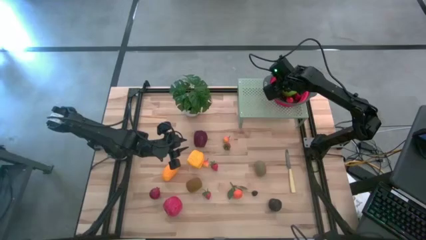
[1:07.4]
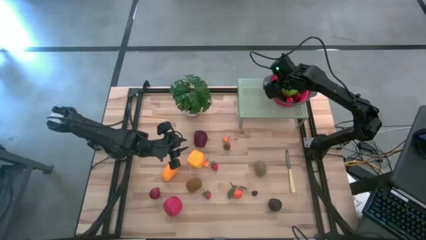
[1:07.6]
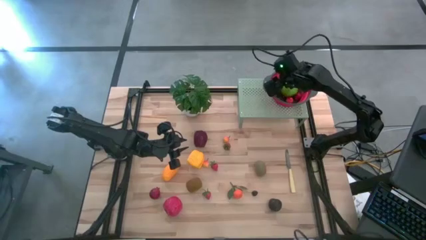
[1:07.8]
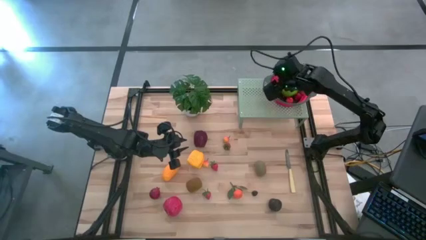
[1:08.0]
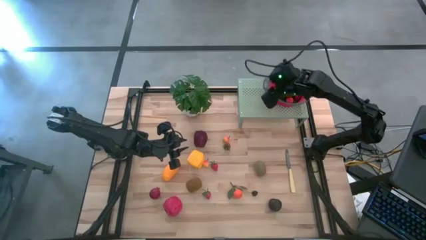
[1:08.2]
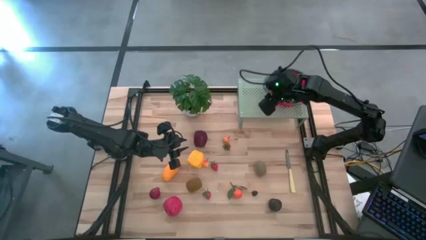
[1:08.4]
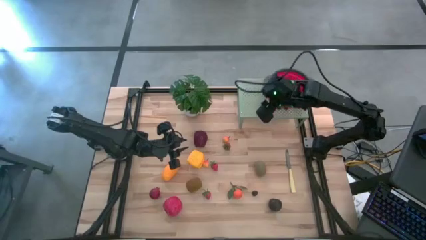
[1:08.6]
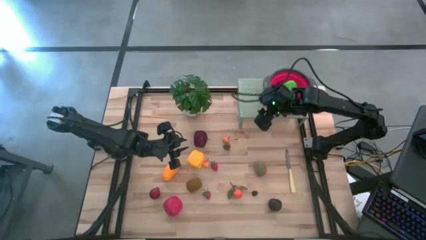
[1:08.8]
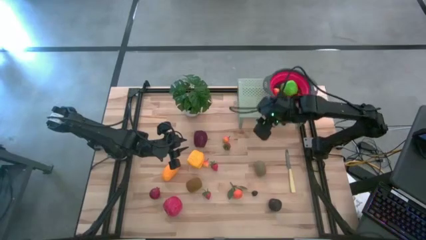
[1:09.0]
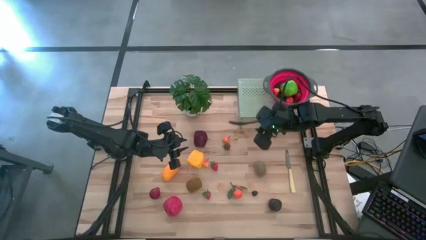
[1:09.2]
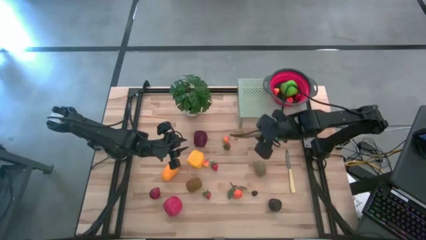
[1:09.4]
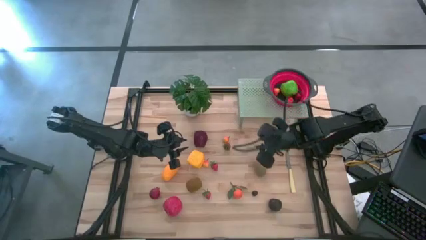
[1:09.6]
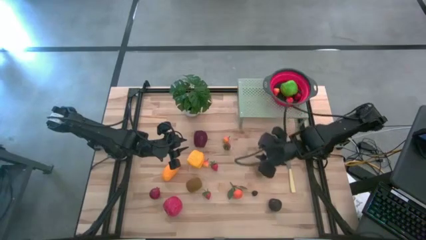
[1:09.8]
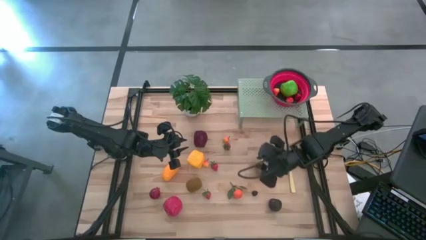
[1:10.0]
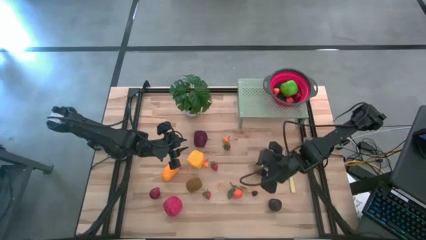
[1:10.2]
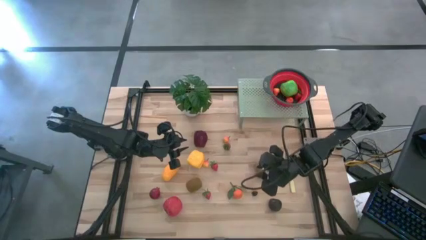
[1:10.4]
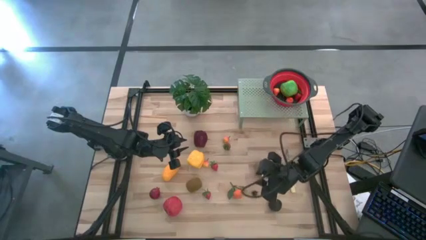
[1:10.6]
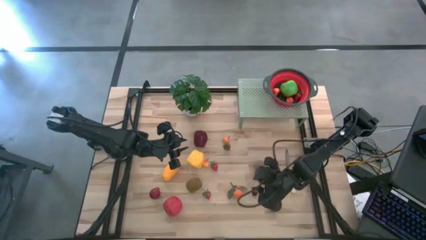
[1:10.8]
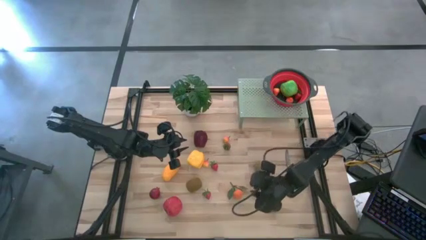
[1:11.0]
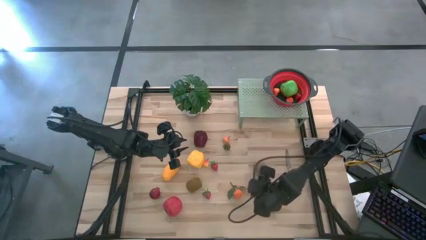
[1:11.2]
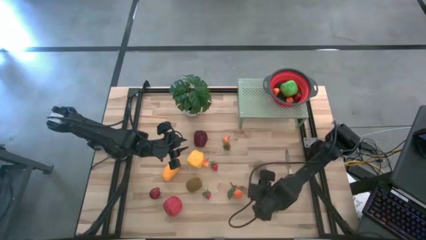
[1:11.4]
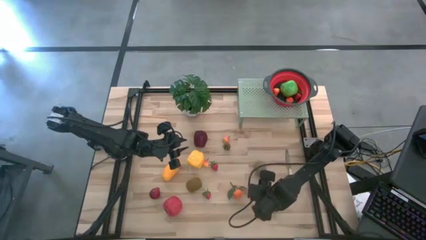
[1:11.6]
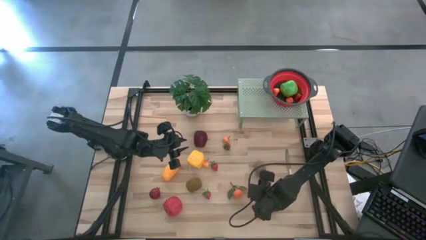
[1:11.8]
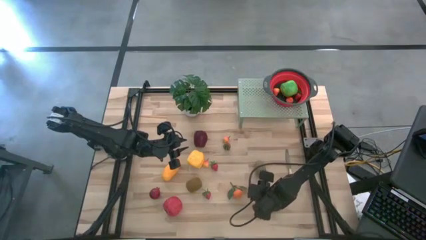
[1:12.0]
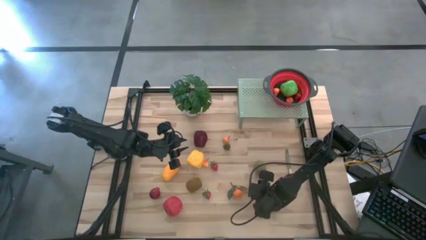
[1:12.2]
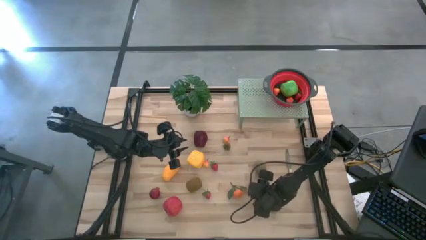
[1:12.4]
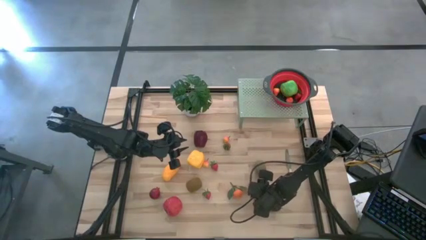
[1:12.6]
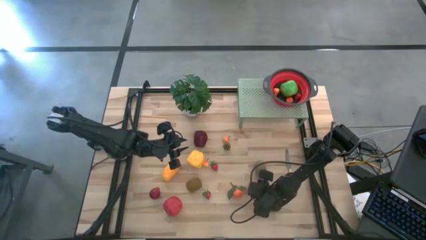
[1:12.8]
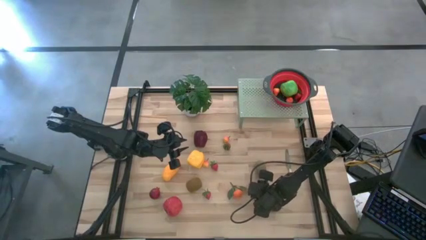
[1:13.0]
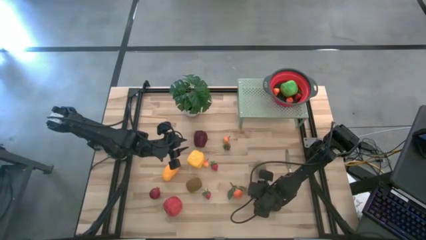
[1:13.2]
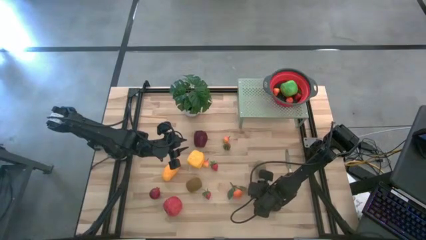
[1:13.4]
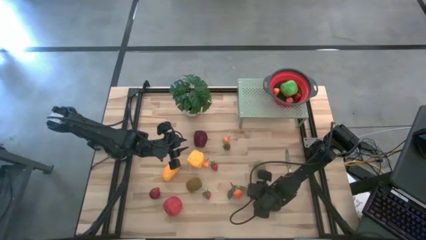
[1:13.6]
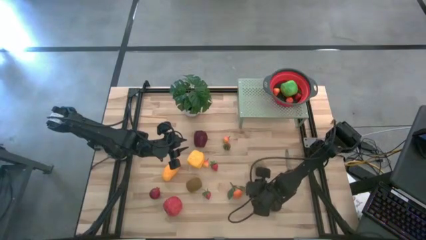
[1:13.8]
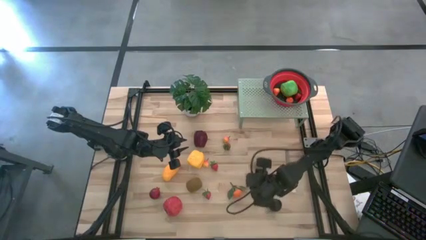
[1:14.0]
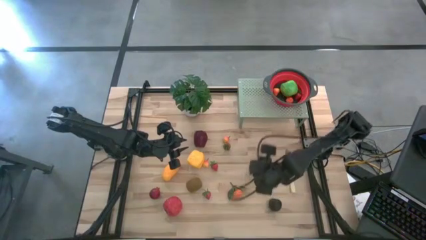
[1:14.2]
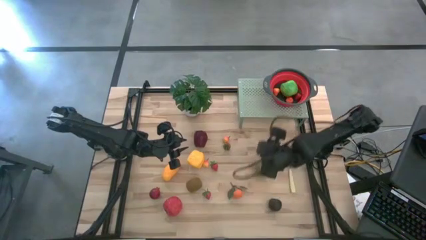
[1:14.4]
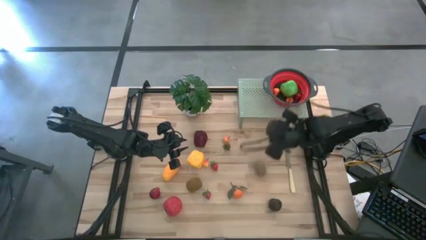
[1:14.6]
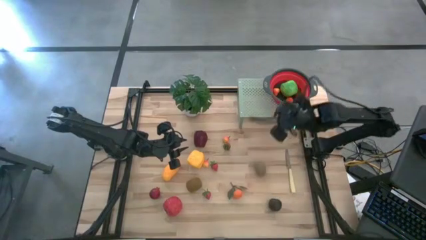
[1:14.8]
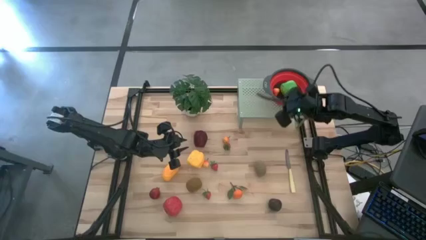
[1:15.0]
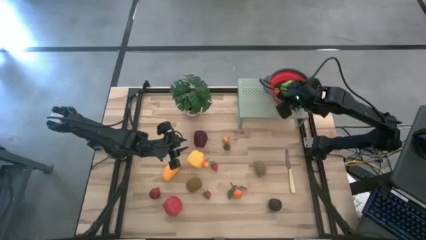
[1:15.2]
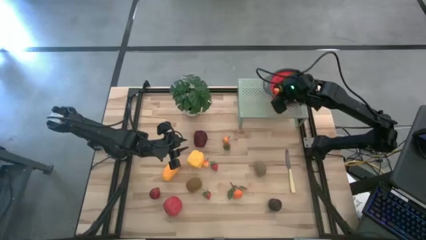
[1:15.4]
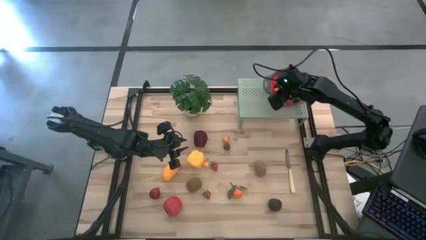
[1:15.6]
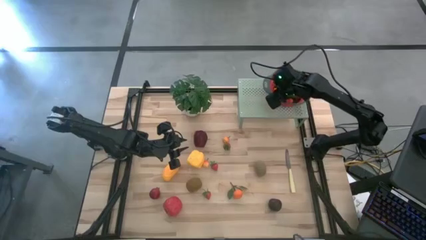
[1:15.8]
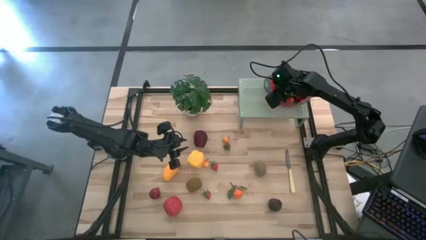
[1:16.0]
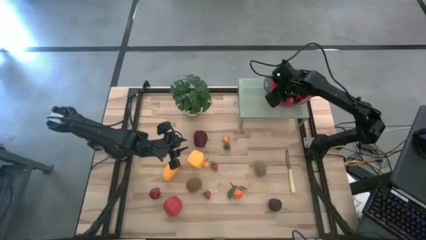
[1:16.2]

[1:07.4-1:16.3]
Task: Pick & Place Fruit
Put the blackberry into the red strainer bowl on the shelf

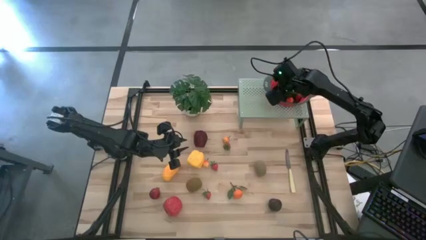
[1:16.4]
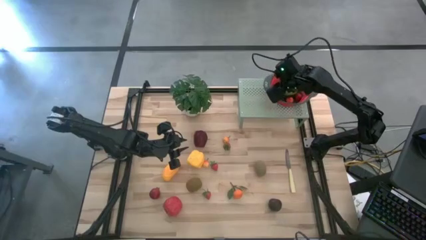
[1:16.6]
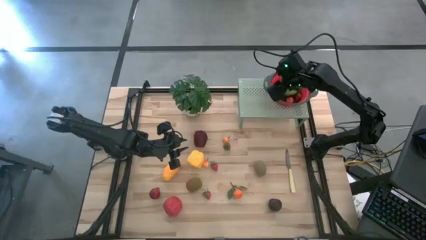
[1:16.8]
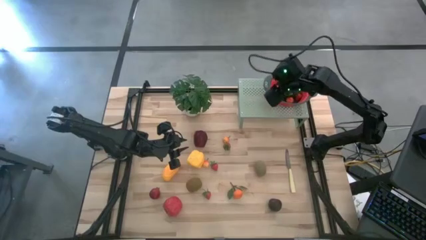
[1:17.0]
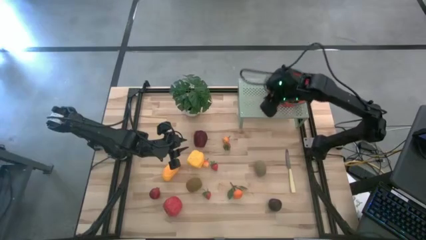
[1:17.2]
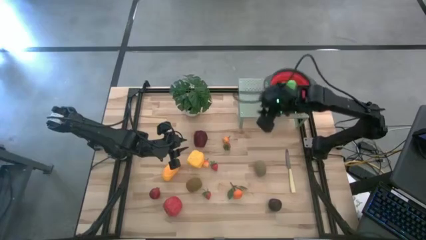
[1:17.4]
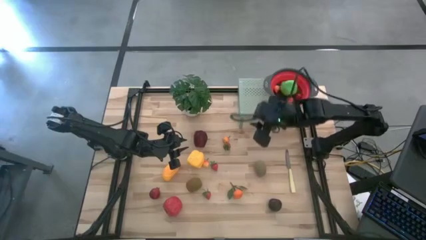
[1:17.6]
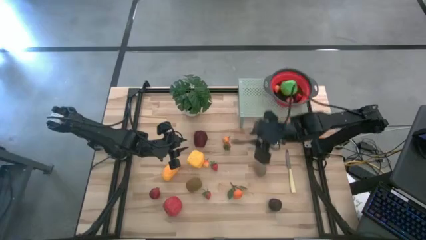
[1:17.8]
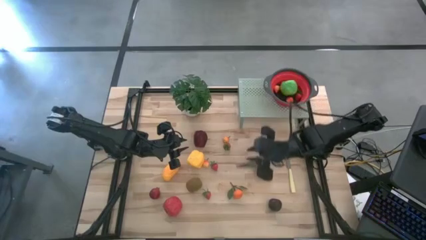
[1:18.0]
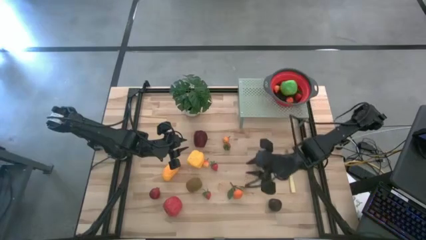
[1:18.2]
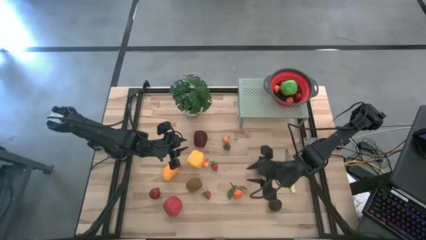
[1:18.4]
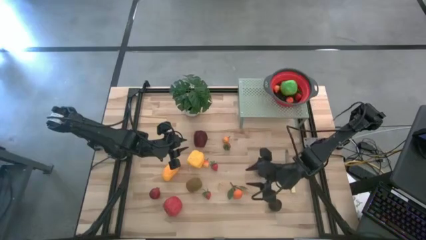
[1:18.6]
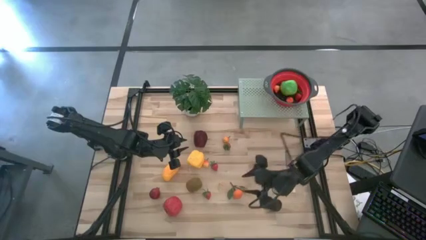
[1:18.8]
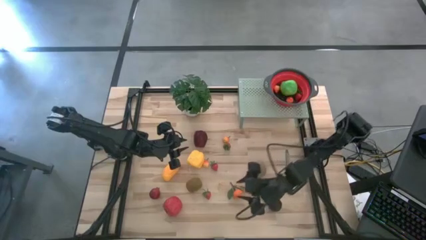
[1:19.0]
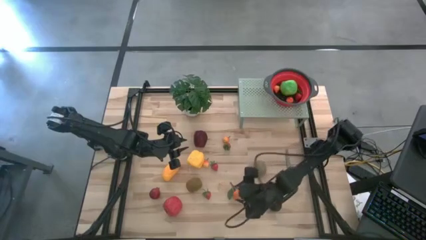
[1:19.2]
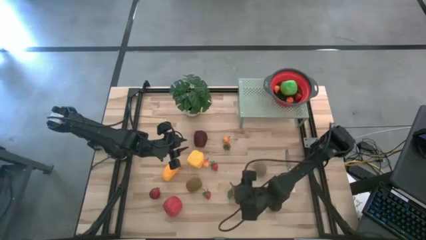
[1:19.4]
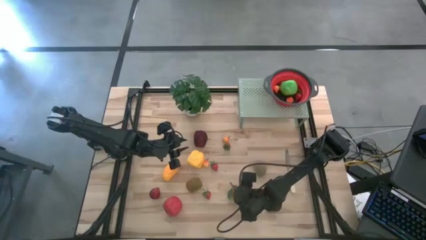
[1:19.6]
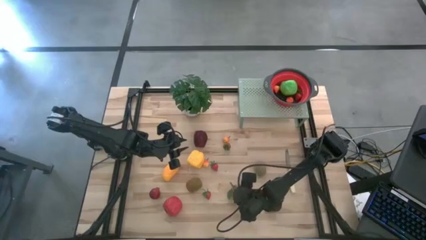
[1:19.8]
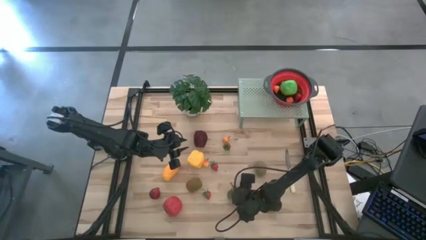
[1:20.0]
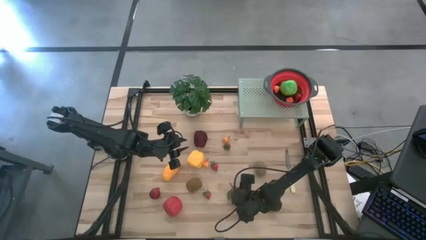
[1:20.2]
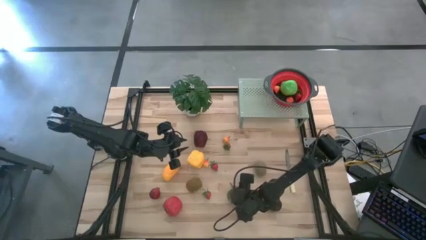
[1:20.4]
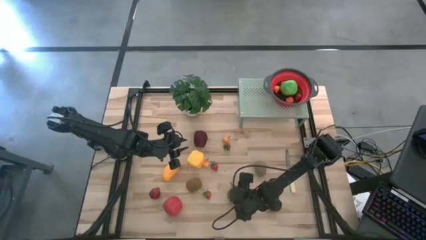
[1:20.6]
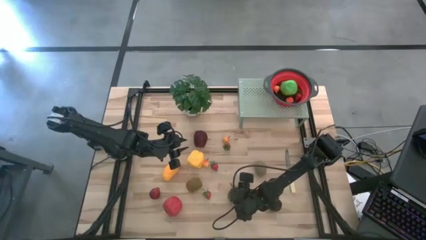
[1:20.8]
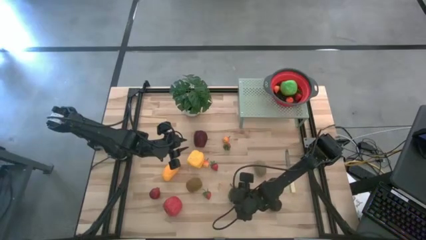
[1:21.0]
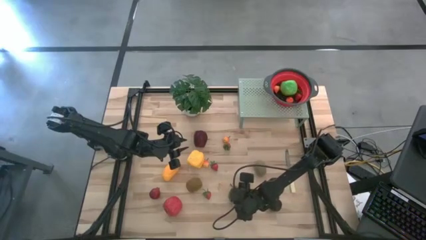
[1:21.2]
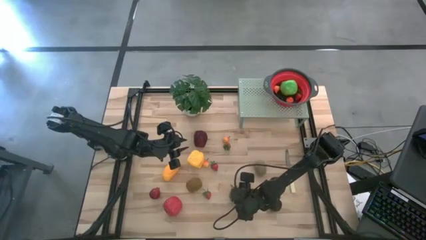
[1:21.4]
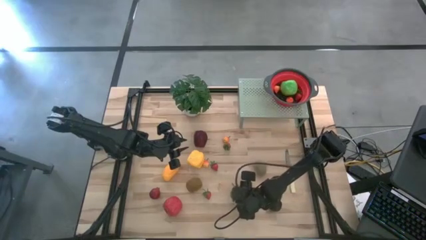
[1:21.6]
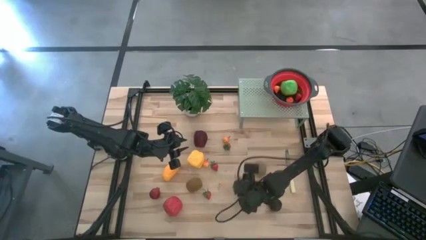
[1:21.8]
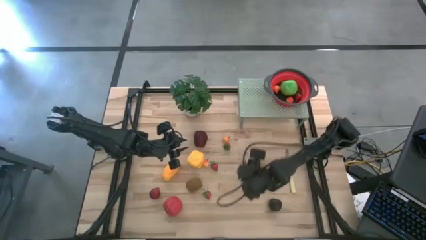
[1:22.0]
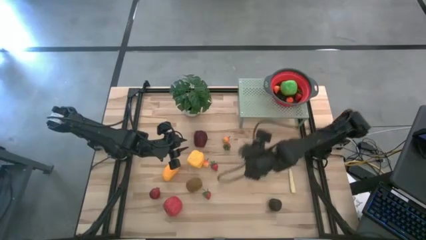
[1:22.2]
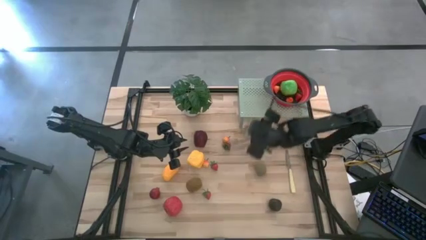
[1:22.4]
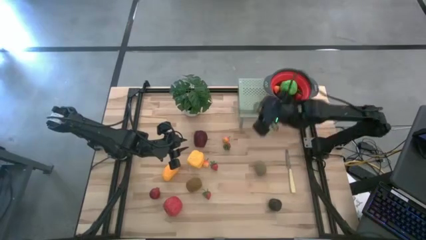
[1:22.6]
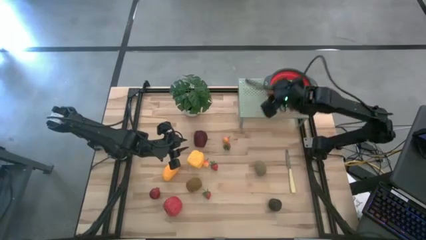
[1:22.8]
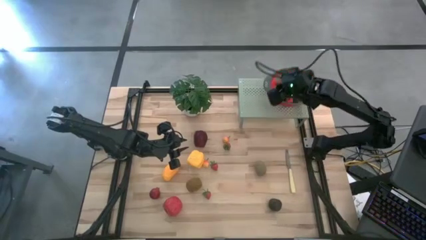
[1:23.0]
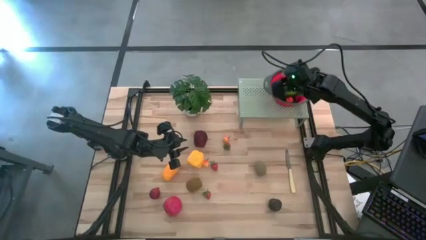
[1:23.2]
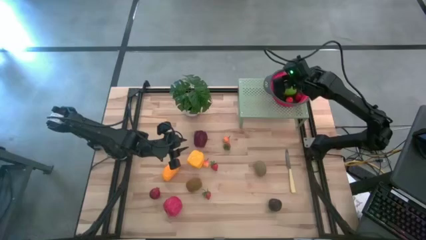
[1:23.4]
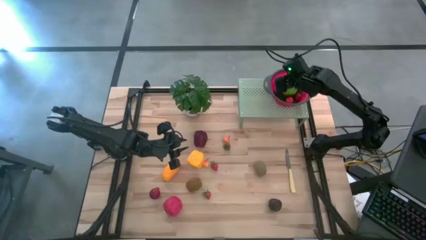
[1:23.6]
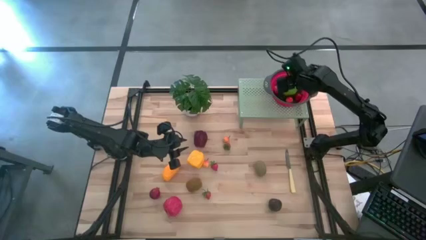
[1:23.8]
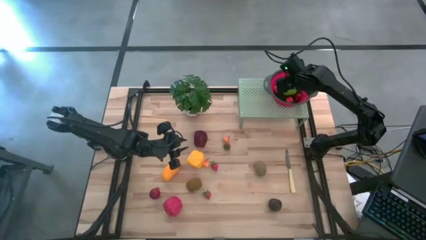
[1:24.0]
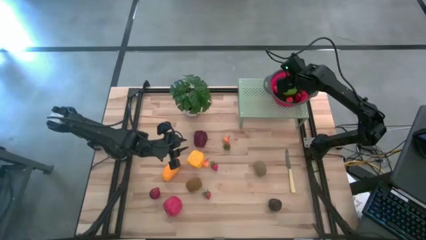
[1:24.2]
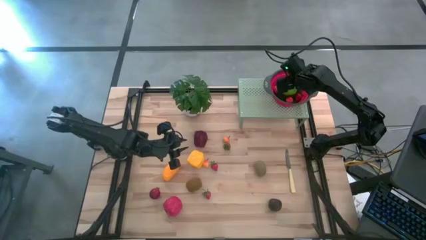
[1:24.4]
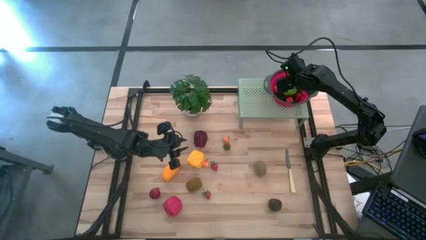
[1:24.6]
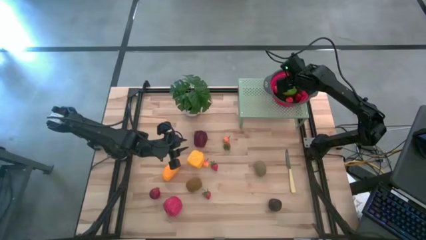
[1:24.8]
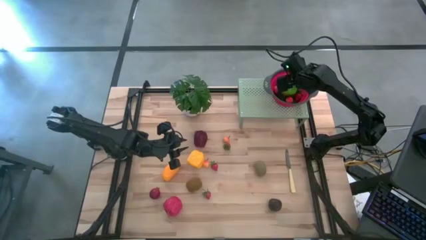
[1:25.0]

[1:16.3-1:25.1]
Put the orange into the red strainer bowl on the shelf
